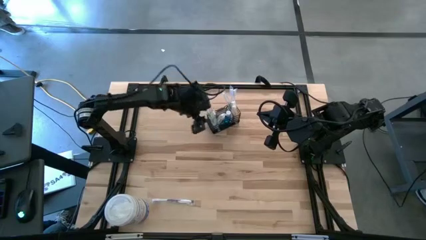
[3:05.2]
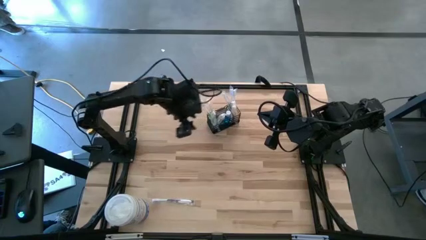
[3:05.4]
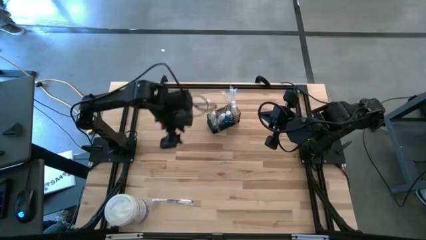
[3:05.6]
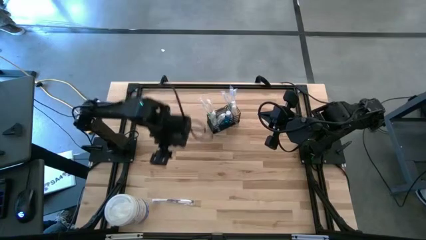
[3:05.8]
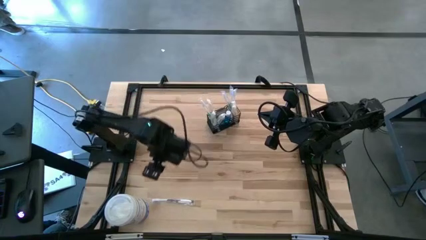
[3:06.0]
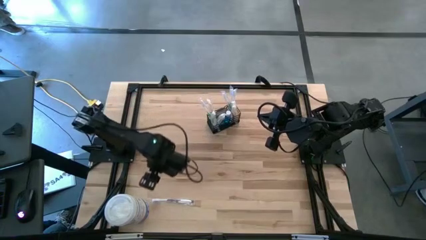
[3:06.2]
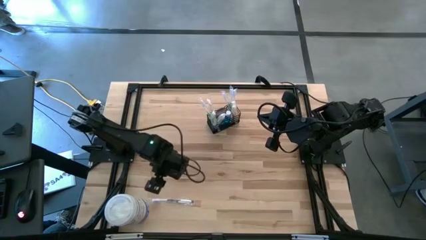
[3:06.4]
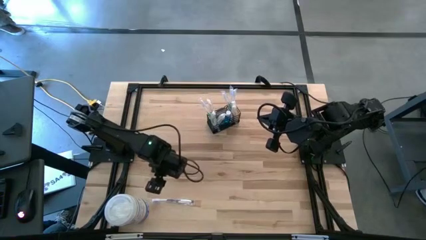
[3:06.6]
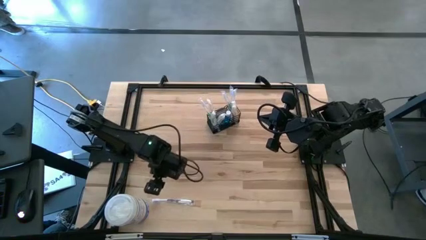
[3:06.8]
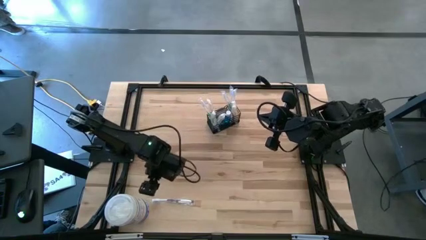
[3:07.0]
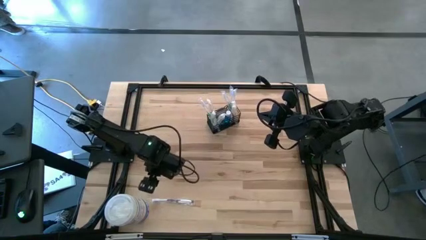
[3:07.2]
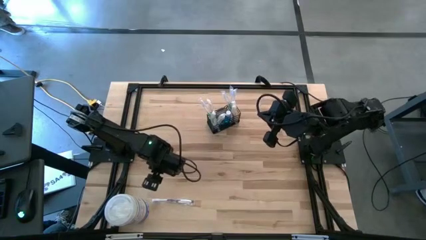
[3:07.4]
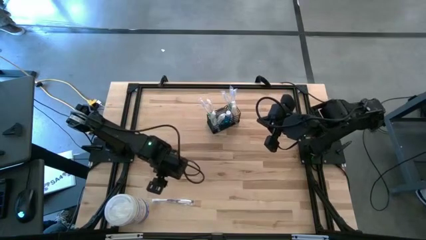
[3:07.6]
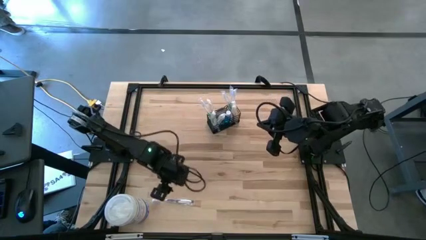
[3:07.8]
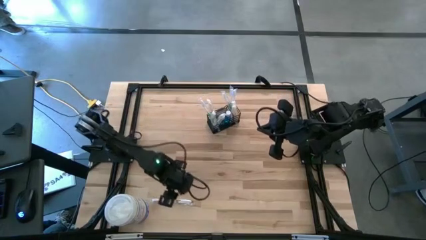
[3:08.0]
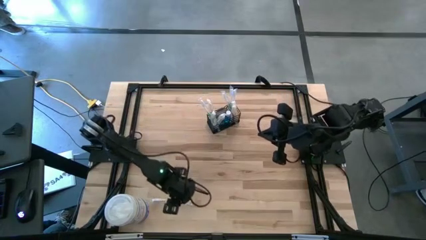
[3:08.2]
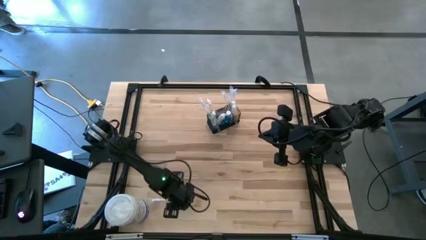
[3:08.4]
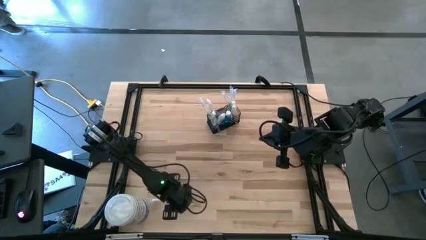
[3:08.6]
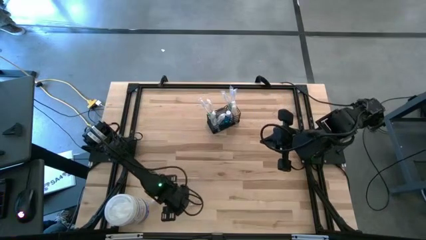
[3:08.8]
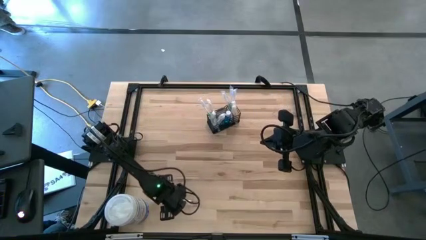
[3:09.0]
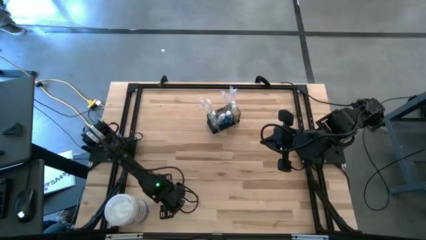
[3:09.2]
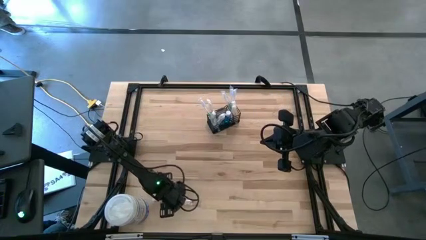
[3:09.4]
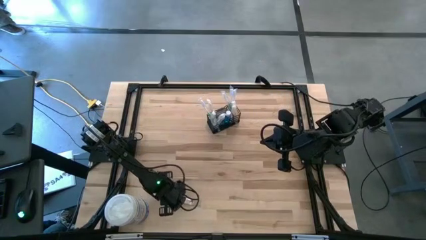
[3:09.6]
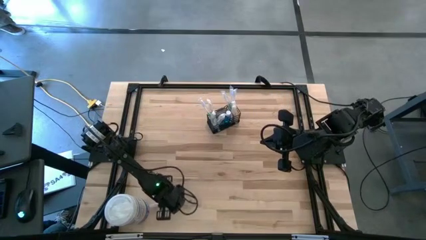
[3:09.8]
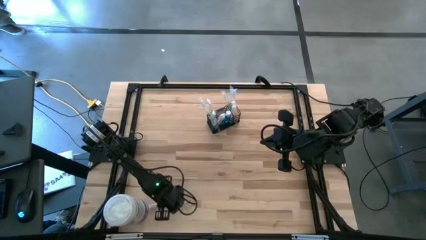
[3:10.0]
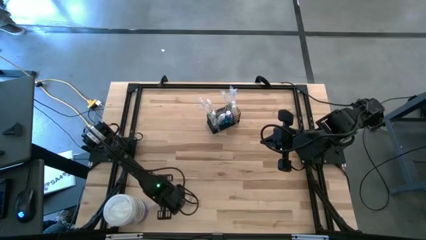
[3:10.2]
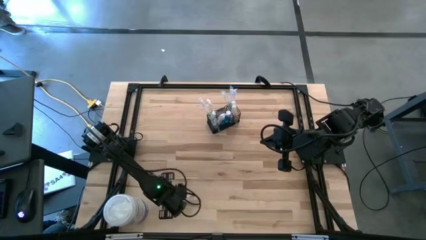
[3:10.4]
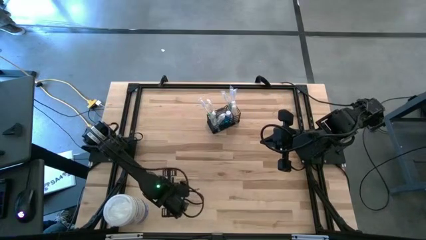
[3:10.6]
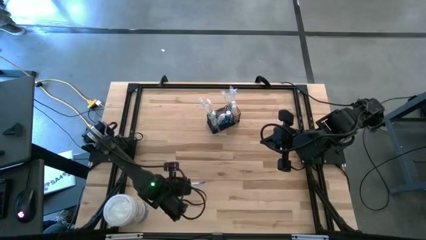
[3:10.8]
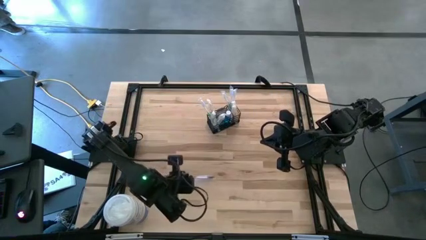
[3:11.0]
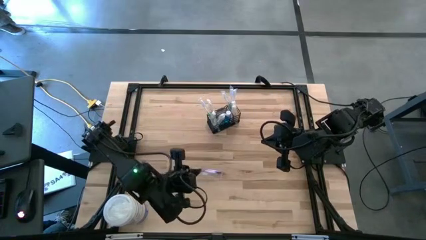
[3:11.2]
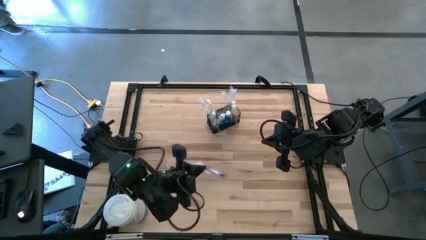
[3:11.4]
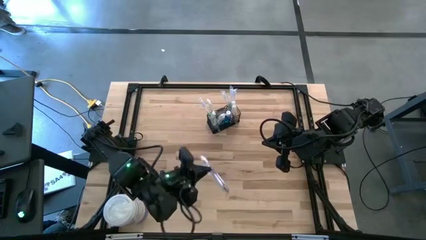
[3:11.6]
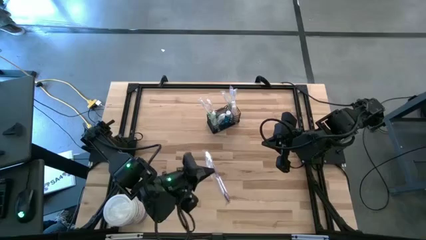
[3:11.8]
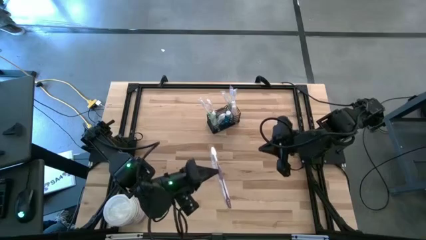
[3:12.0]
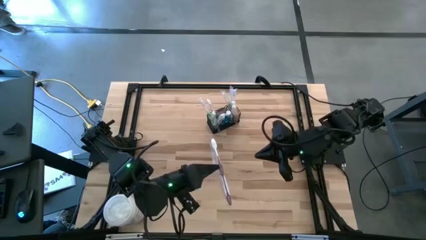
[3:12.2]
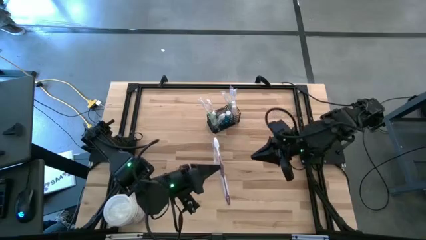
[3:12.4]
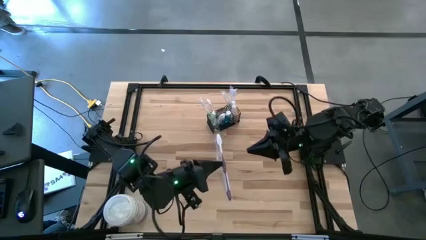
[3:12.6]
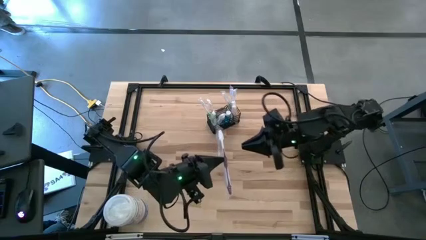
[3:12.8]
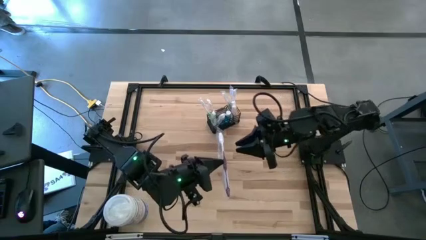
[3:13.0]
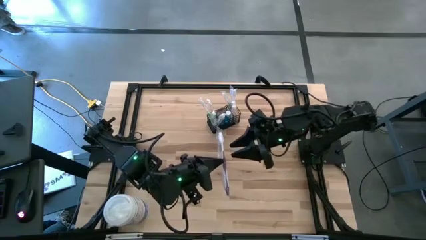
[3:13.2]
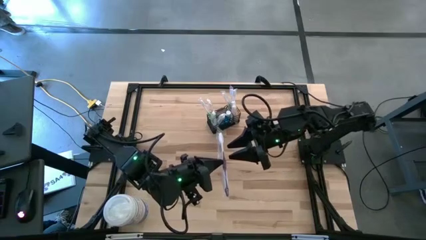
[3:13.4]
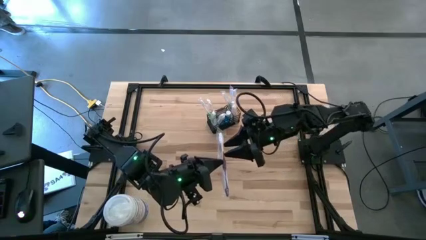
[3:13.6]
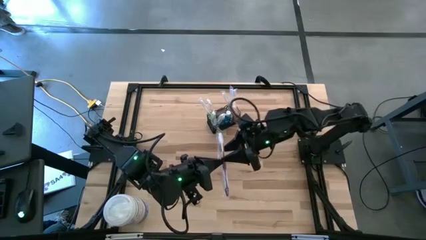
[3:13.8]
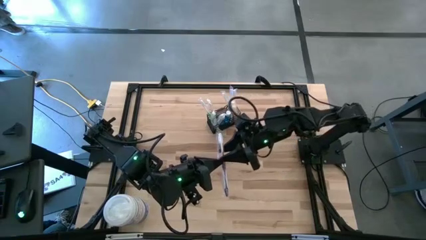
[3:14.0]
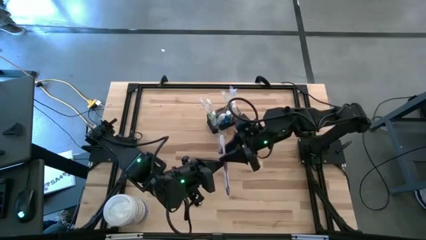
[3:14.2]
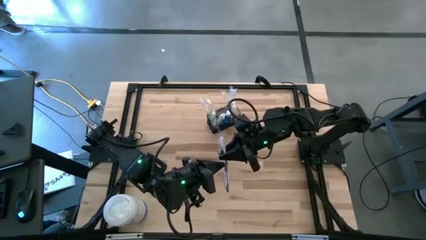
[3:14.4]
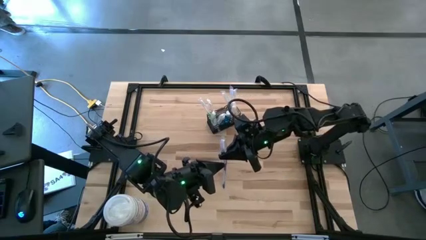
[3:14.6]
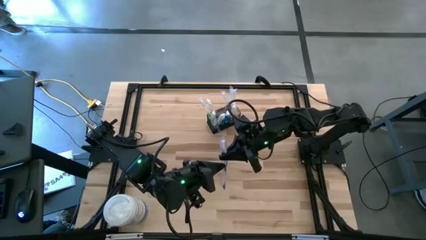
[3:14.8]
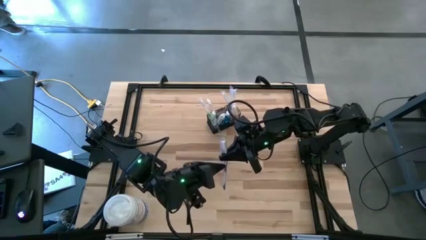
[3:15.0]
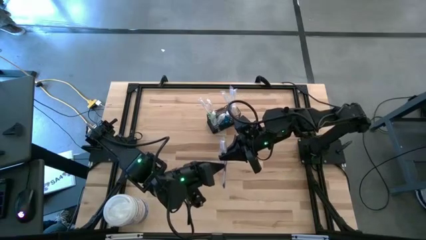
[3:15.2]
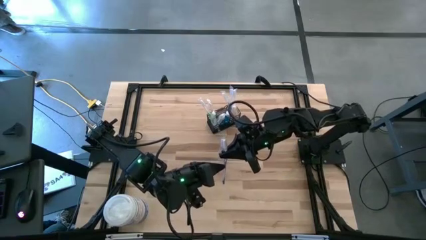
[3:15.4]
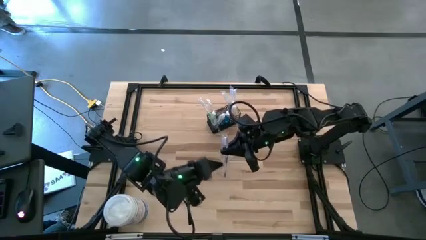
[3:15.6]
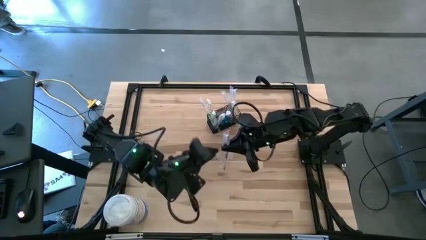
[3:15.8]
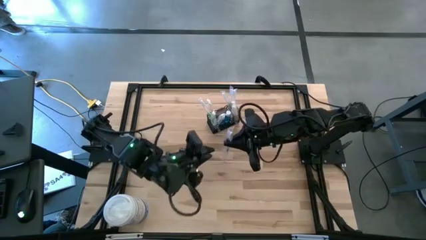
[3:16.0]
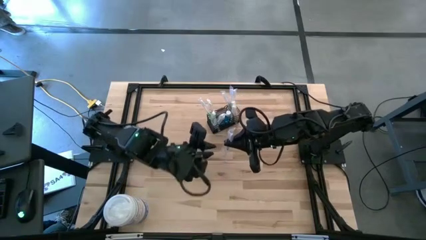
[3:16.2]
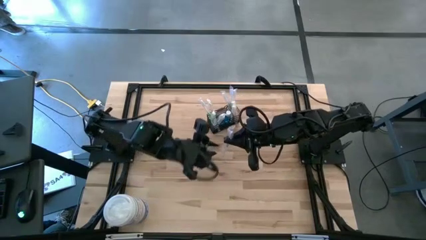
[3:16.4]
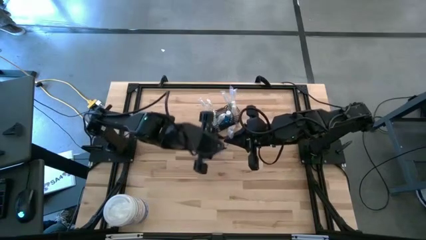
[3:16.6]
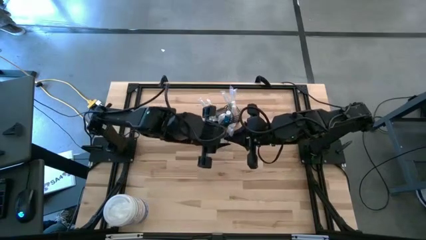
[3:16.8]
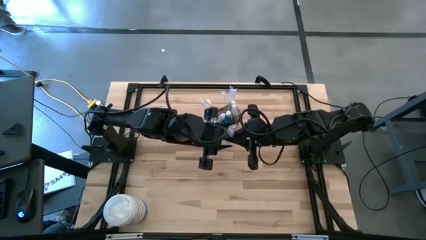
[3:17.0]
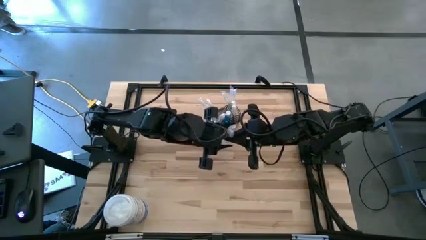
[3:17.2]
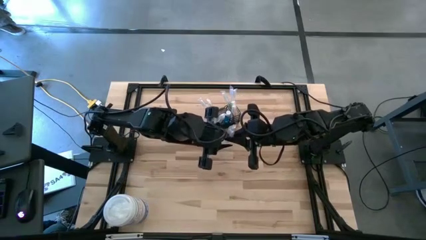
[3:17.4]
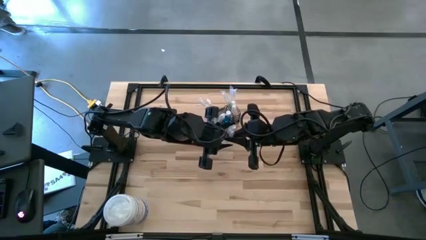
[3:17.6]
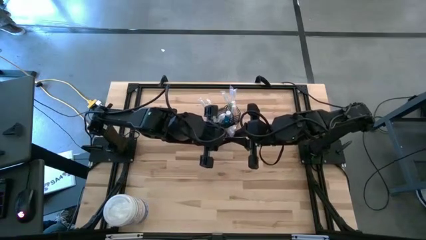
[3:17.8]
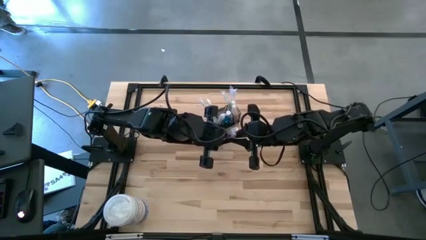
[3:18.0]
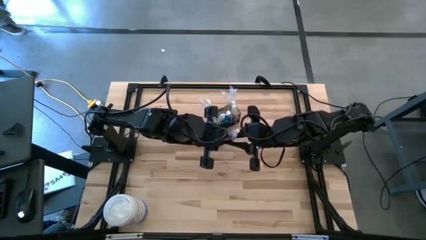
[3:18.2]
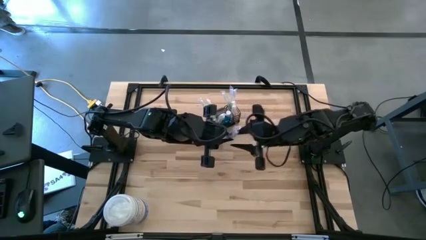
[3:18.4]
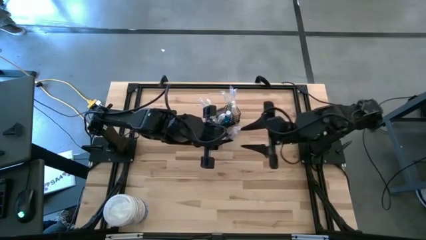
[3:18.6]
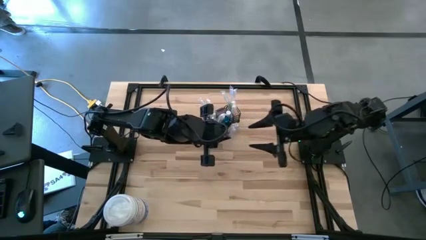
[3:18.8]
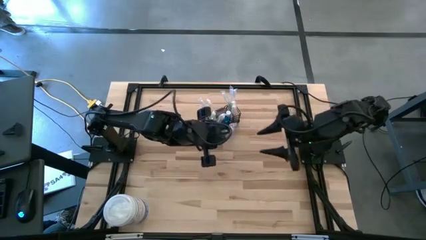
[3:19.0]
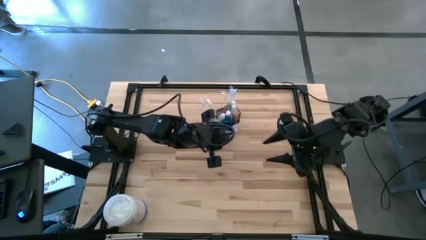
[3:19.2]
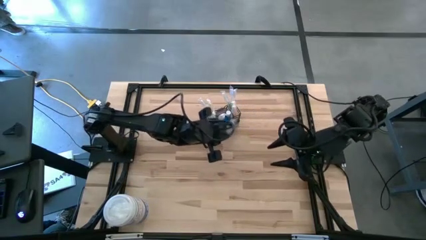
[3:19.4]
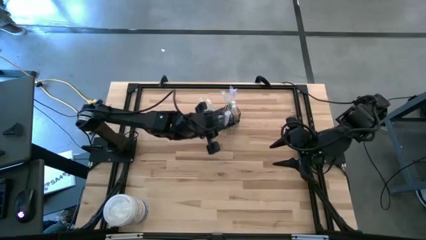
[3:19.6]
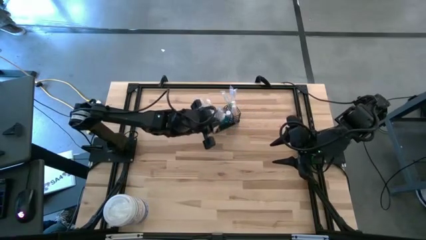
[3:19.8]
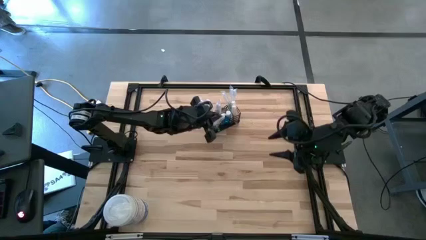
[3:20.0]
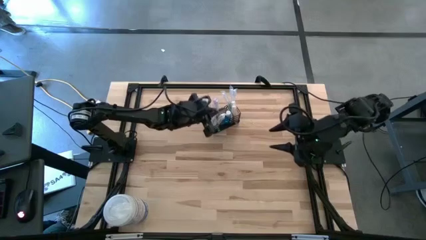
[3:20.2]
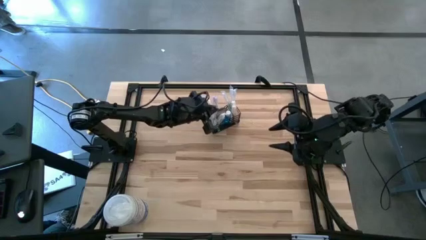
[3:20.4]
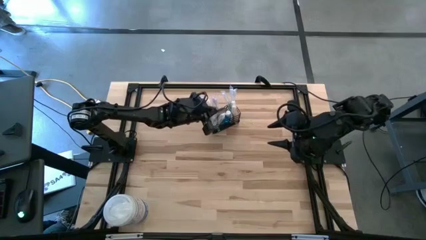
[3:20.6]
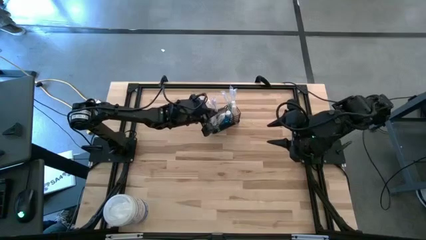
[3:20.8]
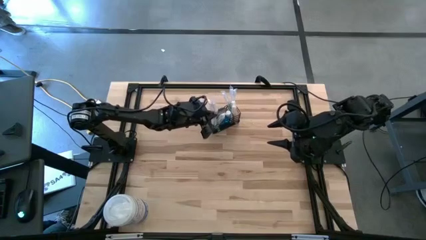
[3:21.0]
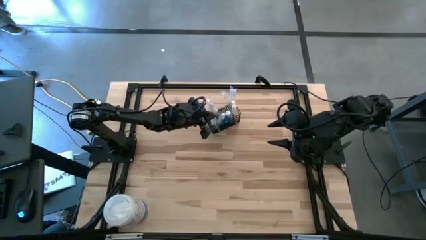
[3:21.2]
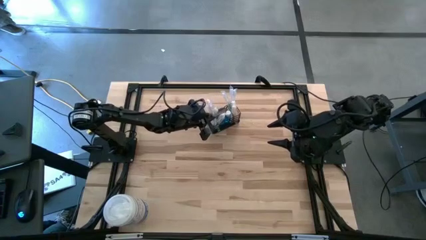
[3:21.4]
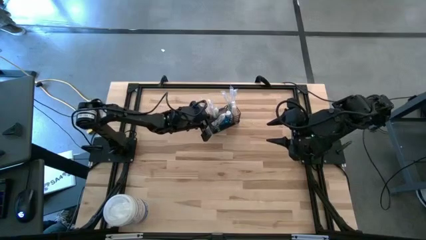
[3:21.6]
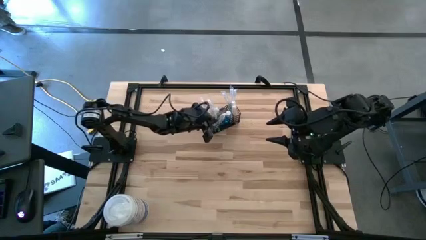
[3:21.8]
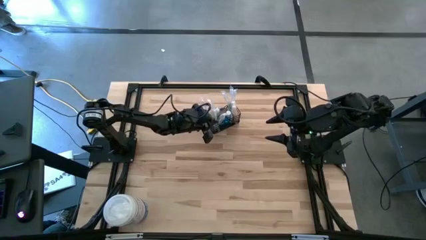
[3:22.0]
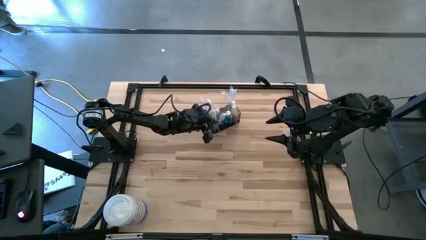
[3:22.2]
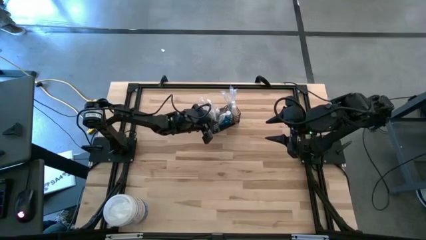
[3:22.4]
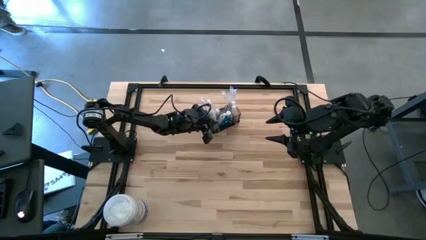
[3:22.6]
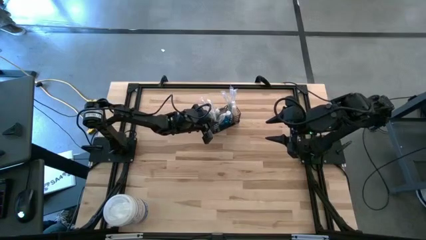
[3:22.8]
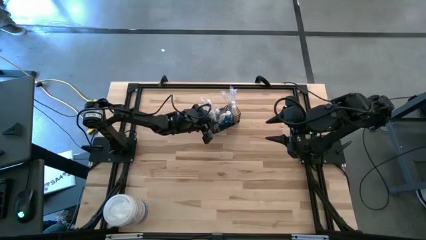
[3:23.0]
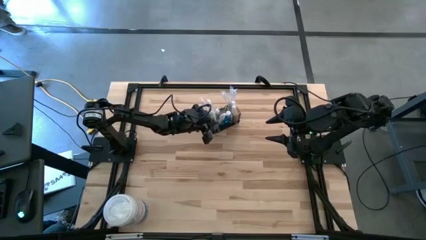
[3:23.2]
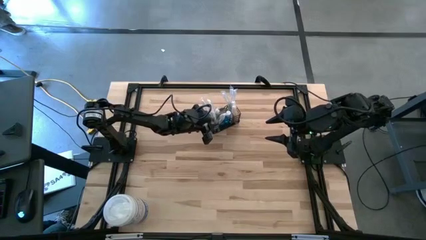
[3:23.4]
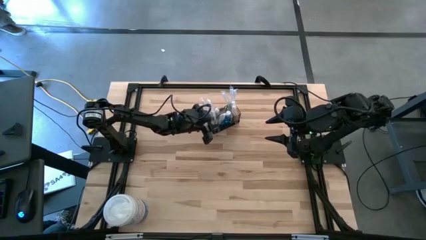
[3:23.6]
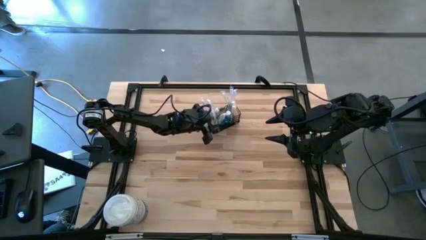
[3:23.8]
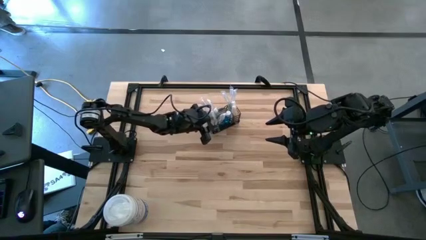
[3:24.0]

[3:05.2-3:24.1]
Task: Pick & Place toothbrushing station
Put the purple toothbrush into the mesh organizer
